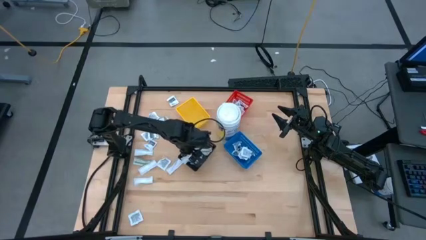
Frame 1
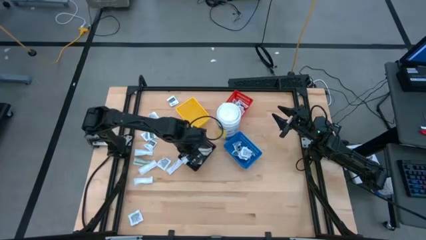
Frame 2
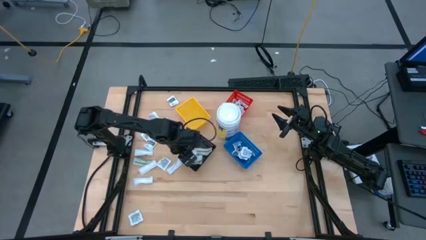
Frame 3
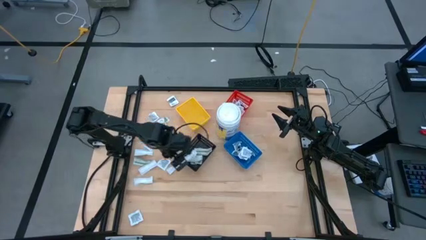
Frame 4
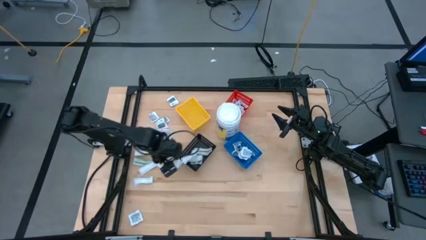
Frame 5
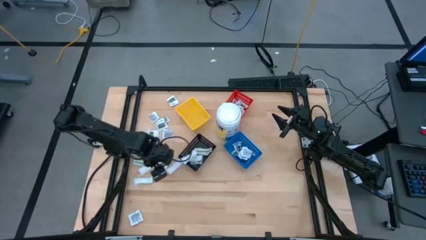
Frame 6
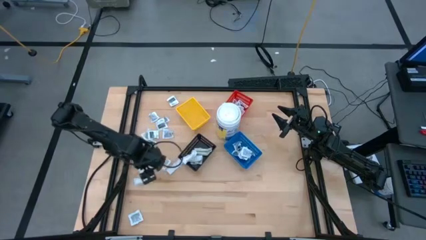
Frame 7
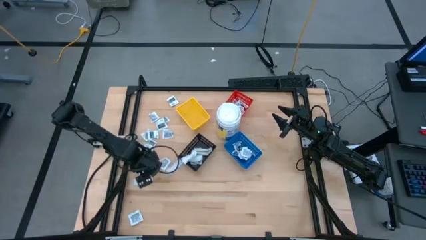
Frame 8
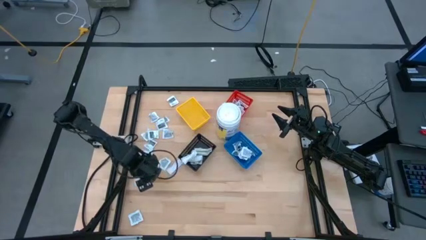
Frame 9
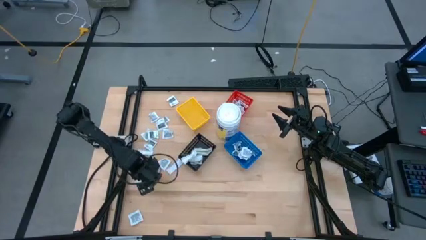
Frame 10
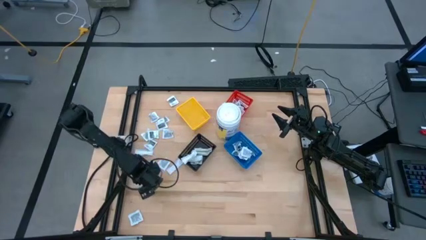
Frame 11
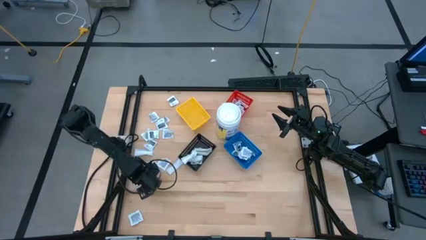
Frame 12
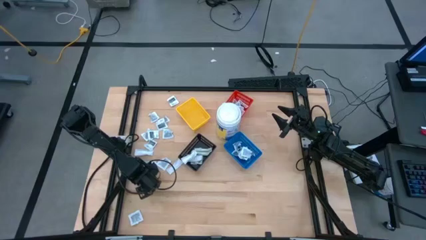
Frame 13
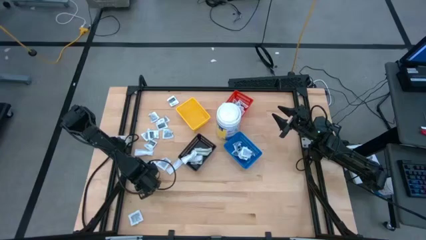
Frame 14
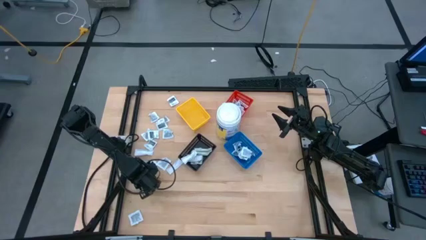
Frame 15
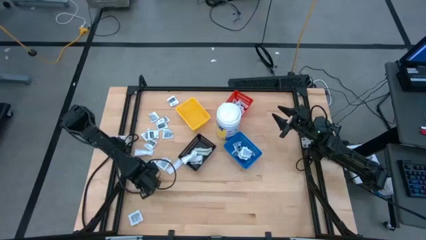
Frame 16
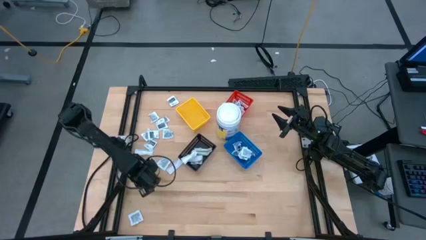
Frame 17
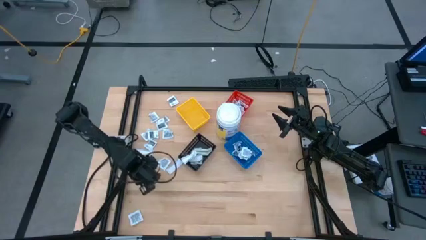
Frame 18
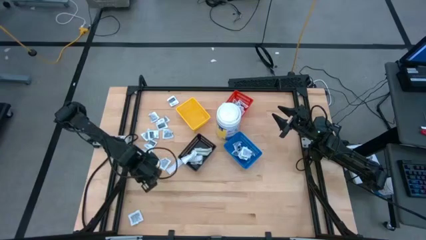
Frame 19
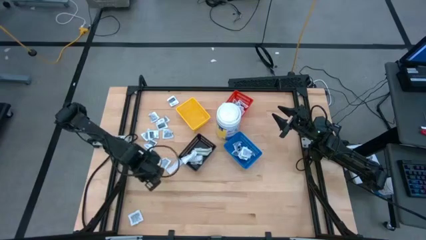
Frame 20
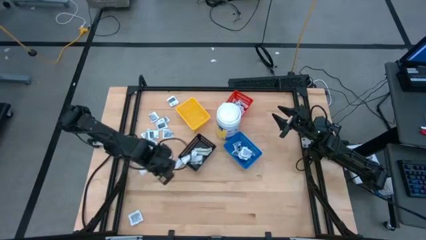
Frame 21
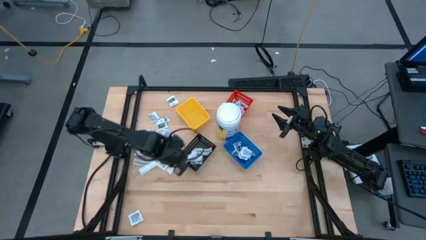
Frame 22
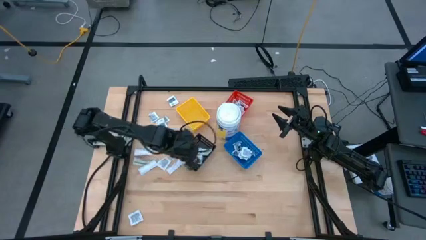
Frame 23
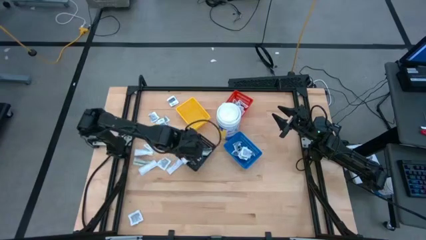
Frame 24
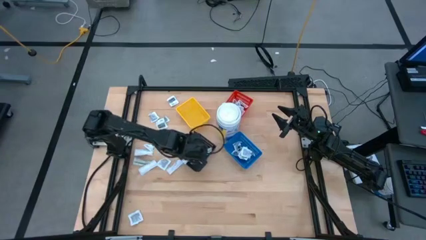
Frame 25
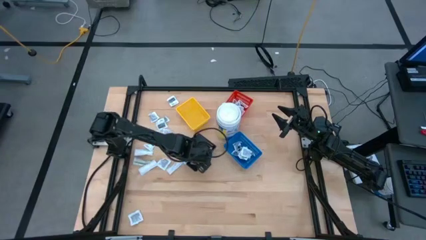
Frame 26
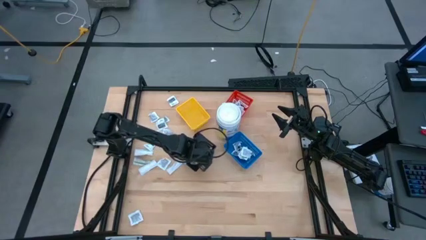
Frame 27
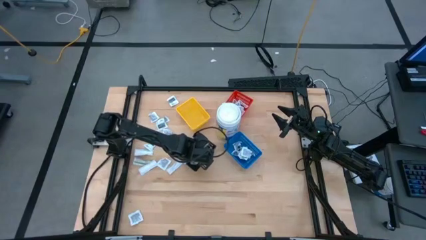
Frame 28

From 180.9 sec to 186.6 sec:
Task: Pick & Place First Aid Supplies
Put the bandage pack into the black bin

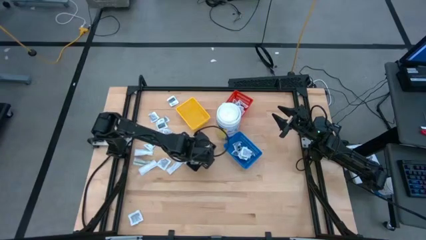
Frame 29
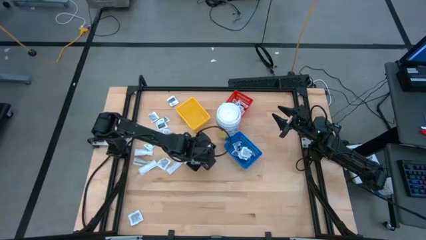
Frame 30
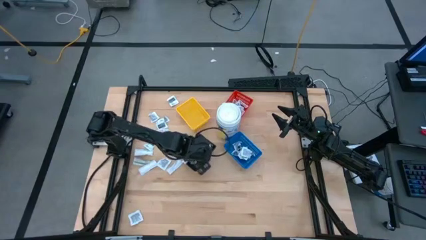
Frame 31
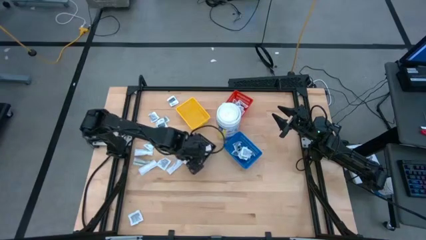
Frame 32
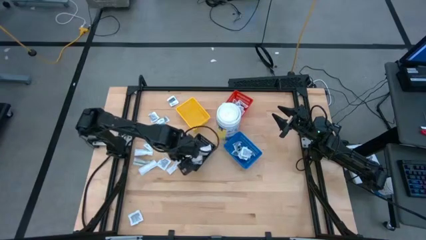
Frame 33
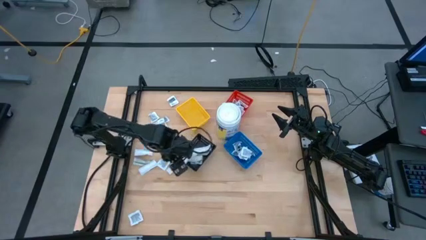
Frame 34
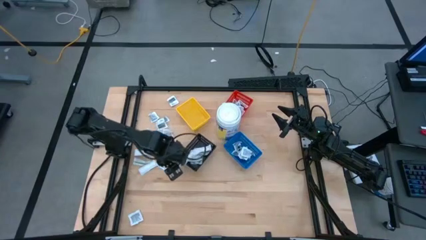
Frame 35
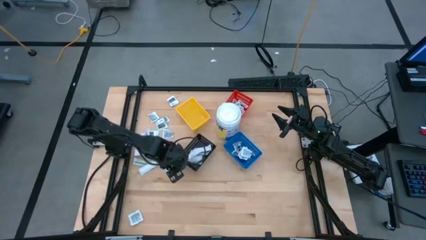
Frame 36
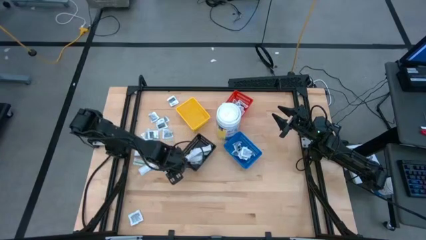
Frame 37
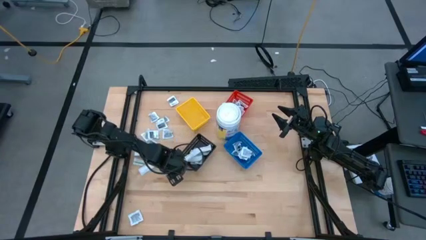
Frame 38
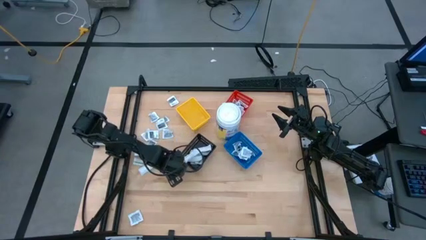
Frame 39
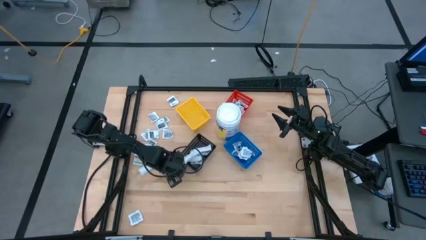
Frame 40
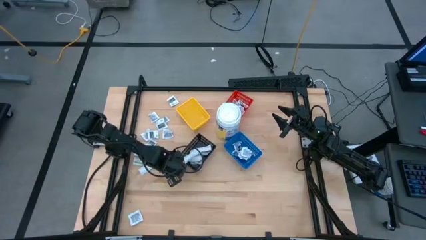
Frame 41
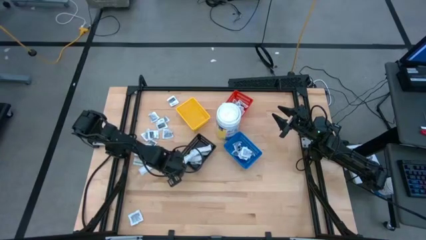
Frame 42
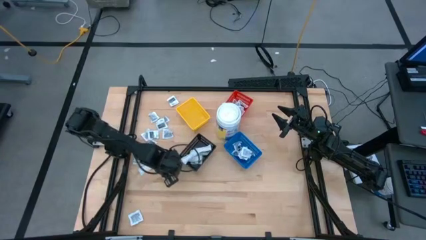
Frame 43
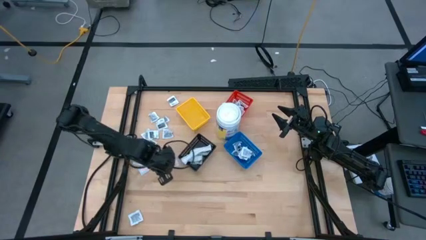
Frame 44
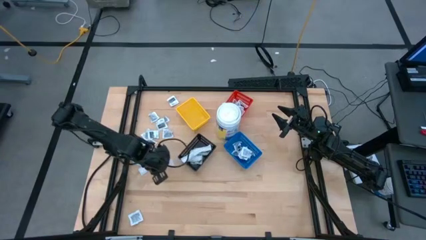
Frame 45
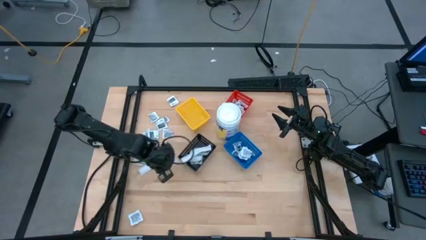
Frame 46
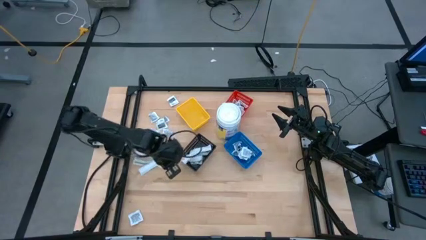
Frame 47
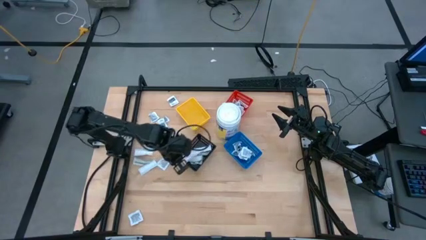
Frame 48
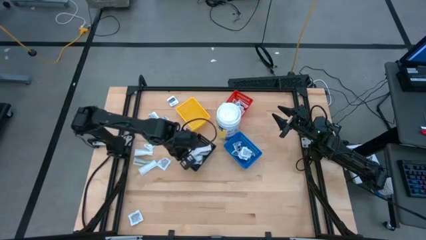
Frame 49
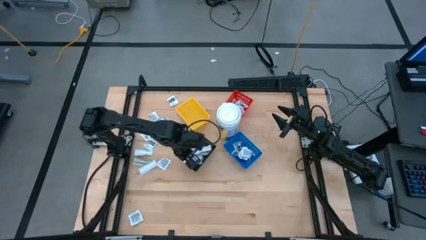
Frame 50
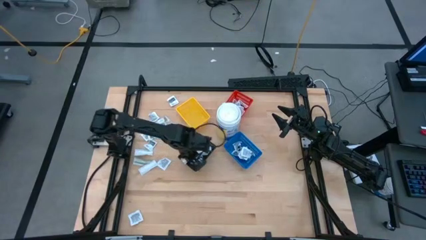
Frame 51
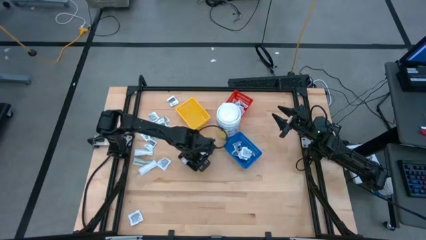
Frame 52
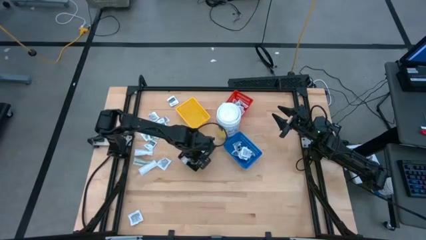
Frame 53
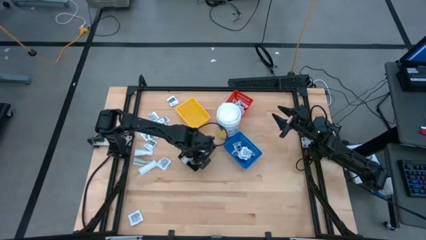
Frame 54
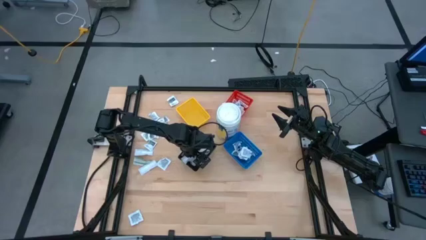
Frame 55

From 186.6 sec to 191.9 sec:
Put the bandage pack into the black bin

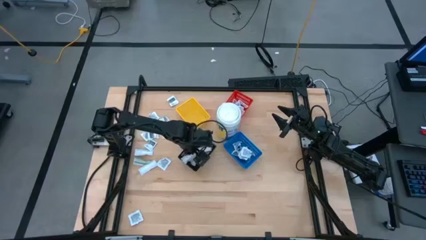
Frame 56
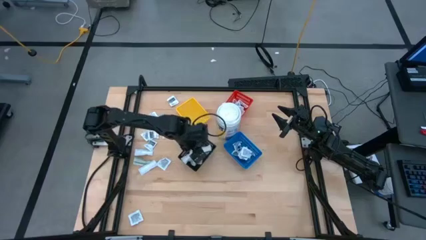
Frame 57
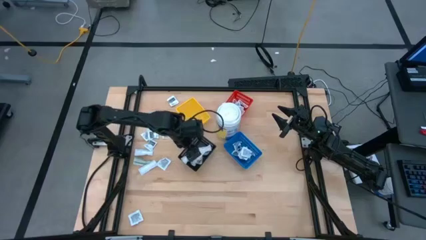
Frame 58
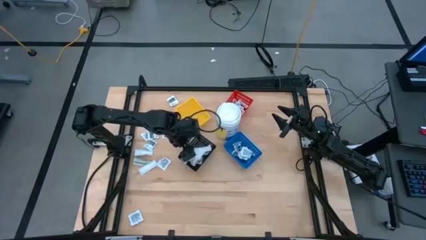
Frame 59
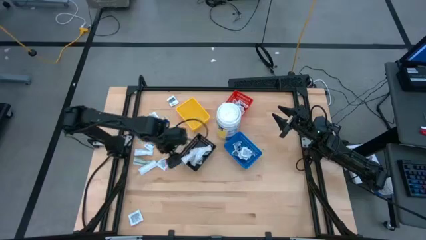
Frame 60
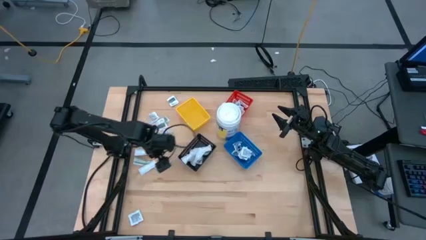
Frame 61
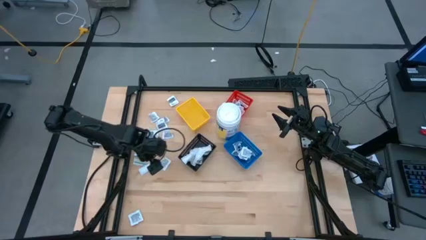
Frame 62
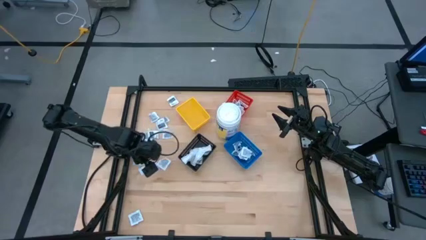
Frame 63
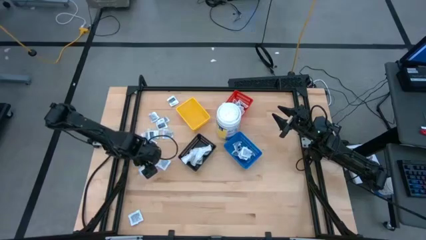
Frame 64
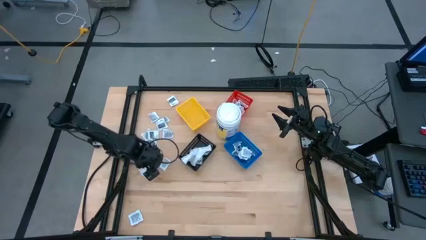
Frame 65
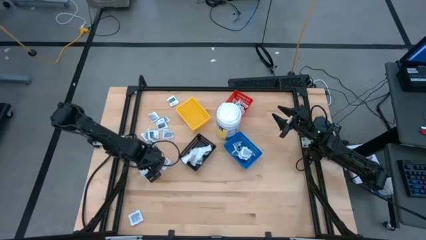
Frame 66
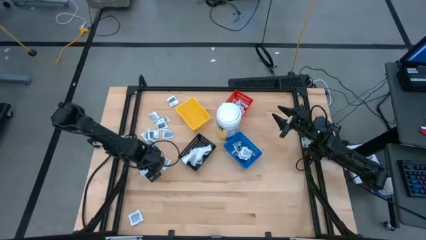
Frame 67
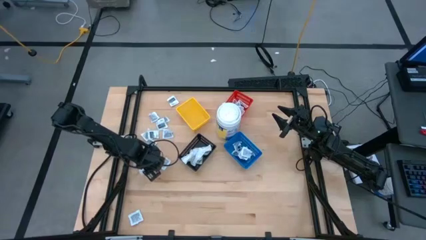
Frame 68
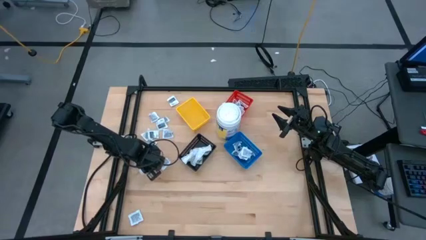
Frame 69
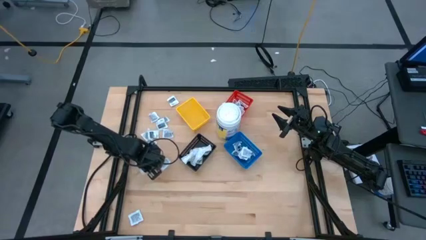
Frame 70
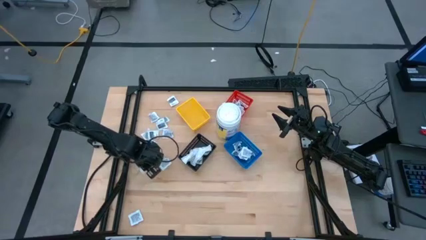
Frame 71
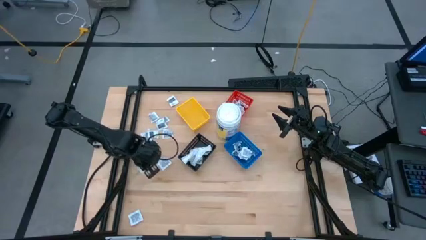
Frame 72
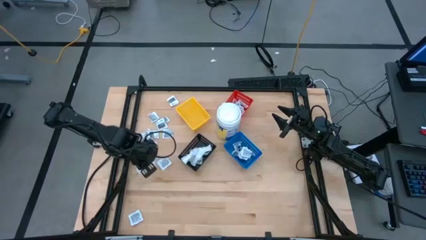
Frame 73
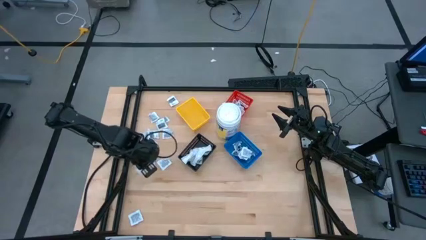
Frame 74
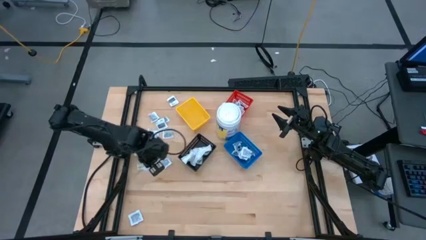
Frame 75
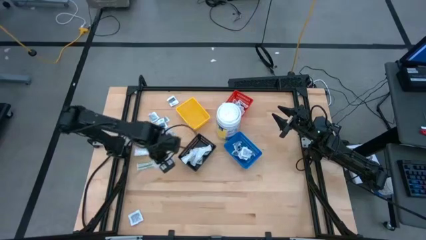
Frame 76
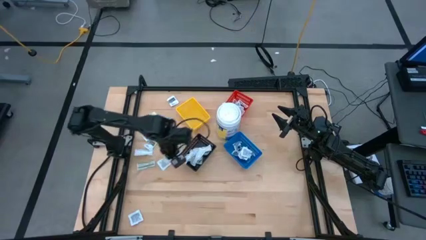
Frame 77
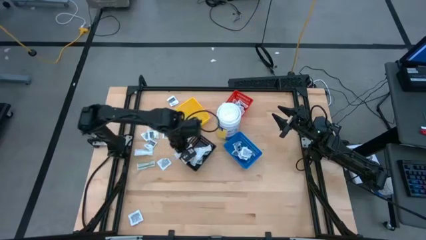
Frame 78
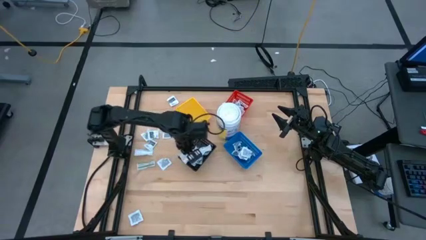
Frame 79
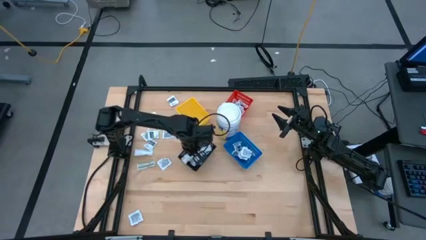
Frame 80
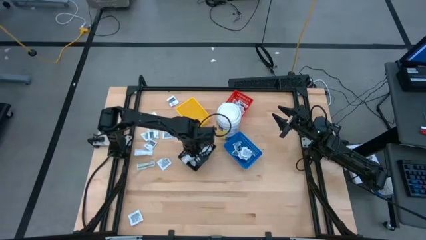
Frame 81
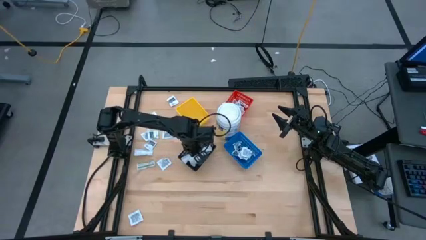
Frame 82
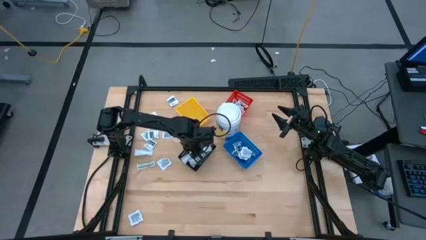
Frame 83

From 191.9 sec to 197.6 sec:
Put the bandage pack into the black bin
